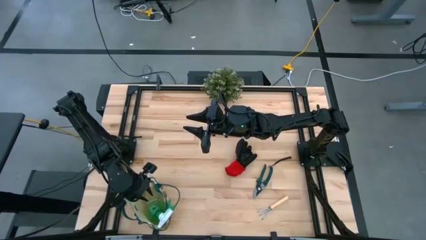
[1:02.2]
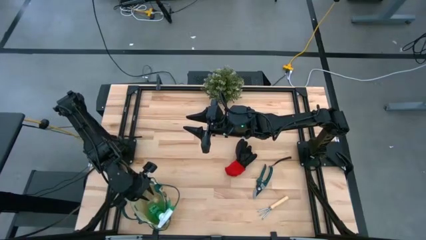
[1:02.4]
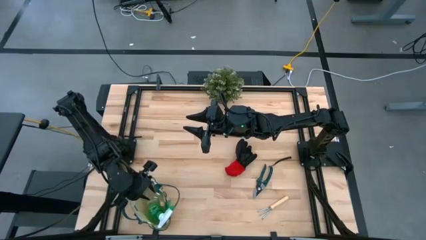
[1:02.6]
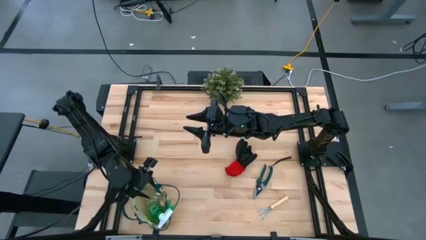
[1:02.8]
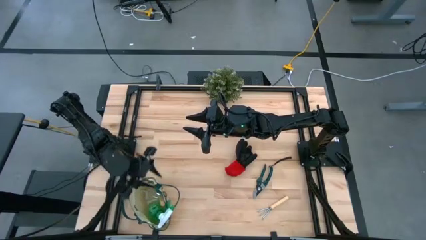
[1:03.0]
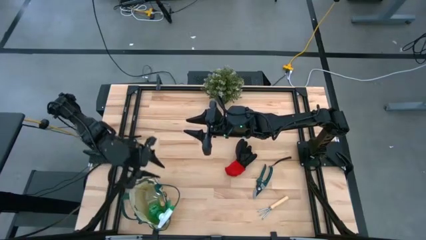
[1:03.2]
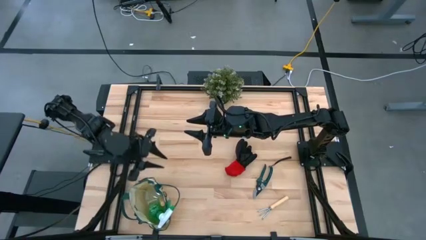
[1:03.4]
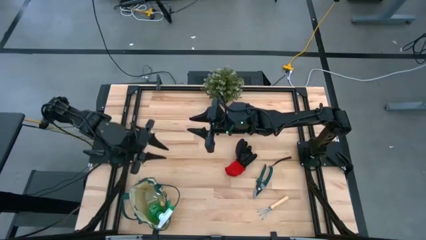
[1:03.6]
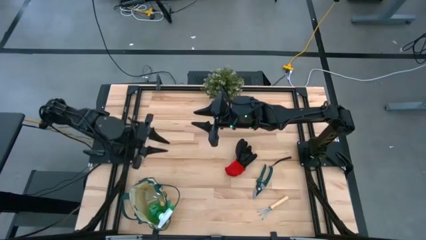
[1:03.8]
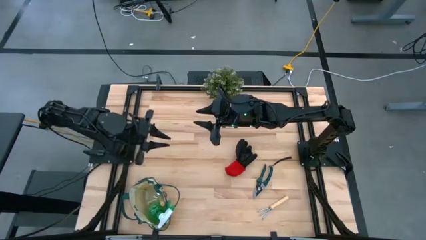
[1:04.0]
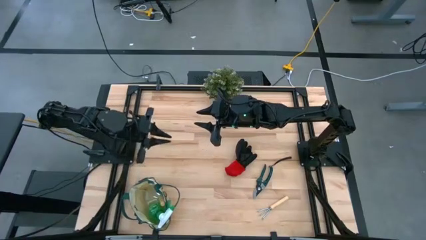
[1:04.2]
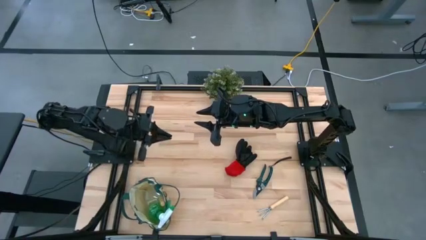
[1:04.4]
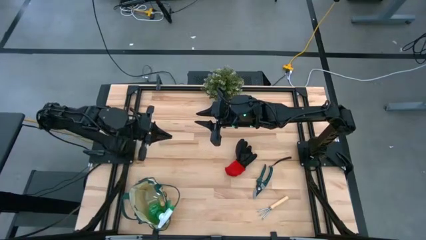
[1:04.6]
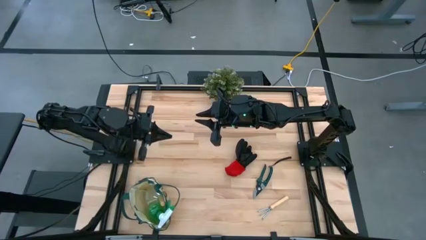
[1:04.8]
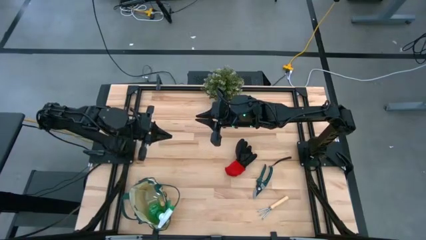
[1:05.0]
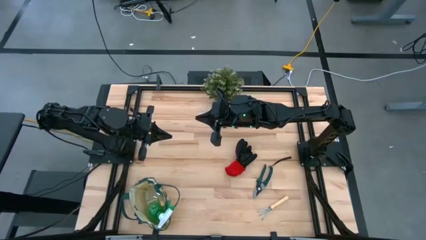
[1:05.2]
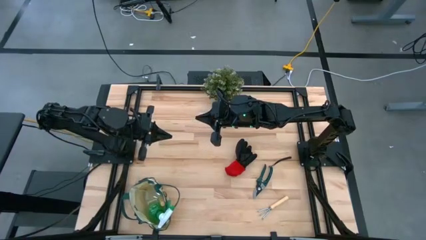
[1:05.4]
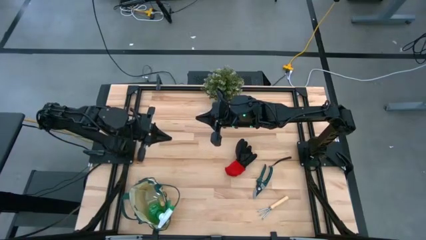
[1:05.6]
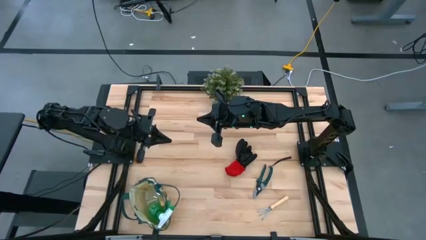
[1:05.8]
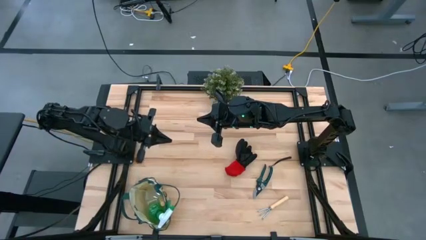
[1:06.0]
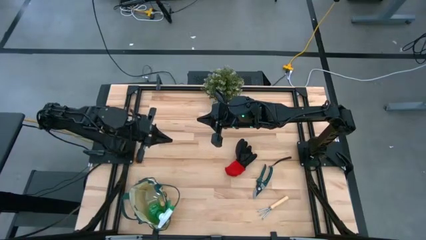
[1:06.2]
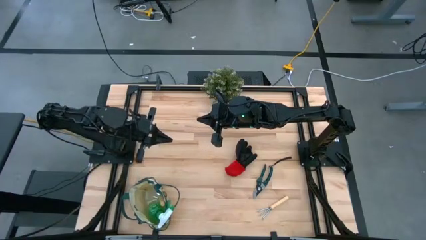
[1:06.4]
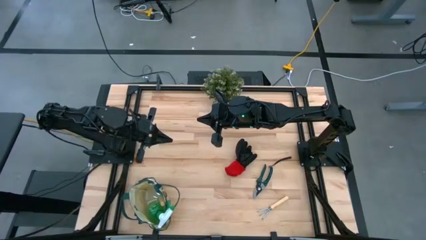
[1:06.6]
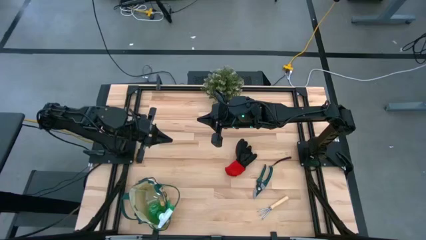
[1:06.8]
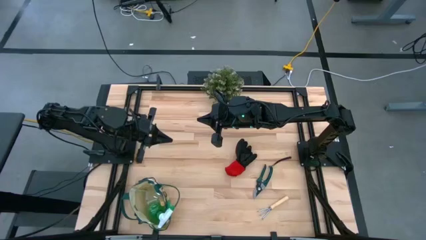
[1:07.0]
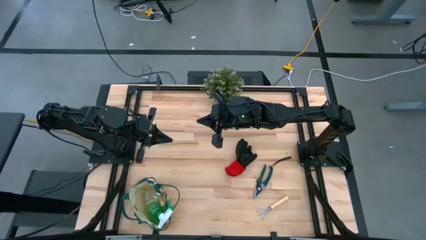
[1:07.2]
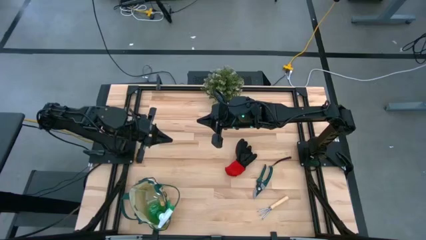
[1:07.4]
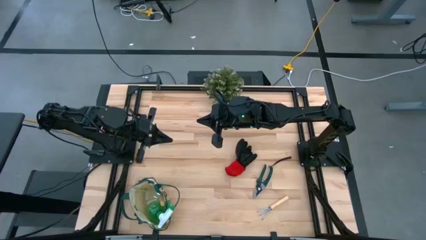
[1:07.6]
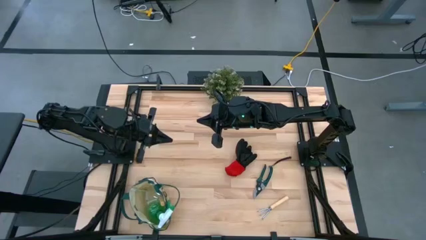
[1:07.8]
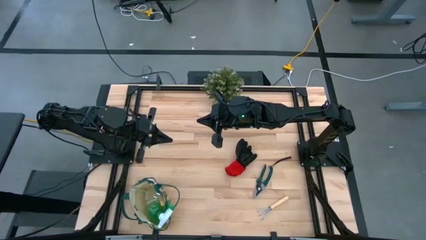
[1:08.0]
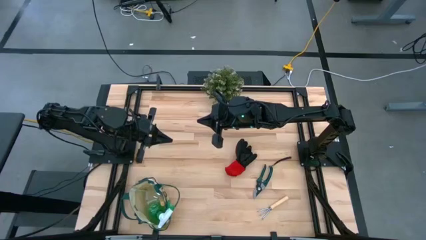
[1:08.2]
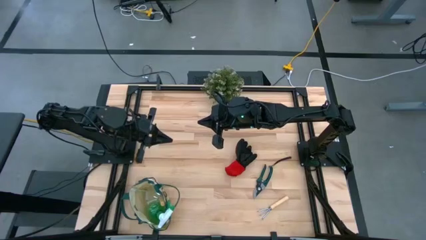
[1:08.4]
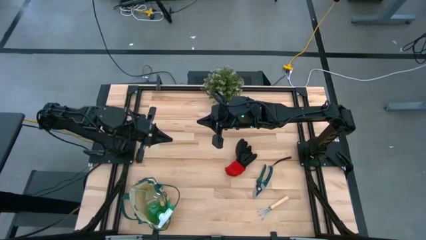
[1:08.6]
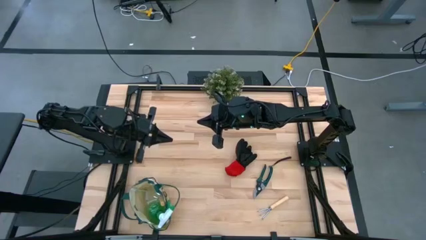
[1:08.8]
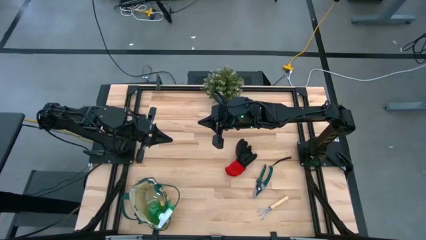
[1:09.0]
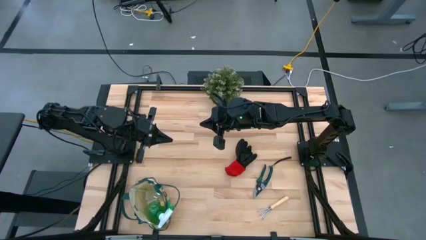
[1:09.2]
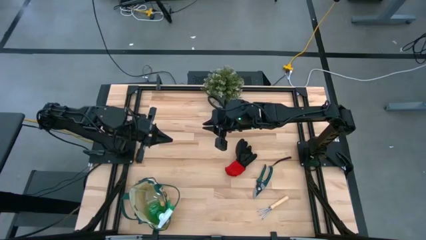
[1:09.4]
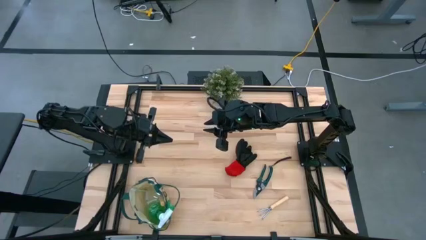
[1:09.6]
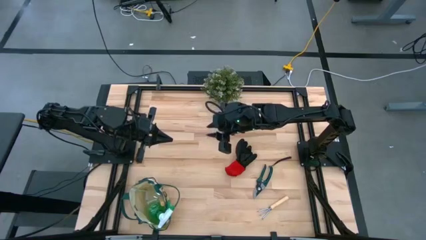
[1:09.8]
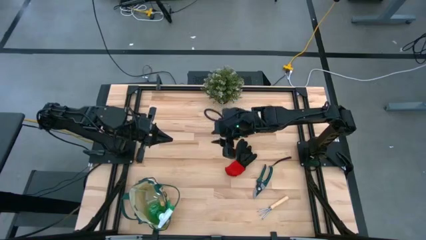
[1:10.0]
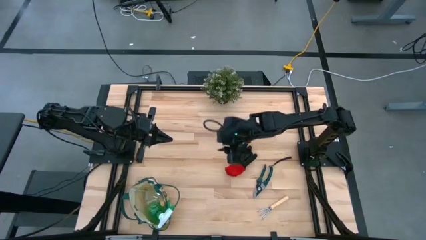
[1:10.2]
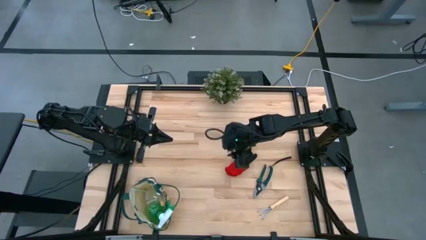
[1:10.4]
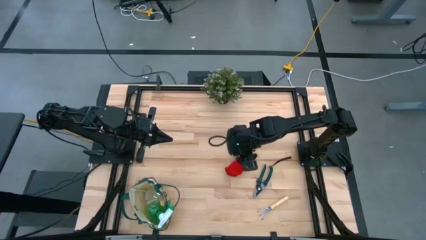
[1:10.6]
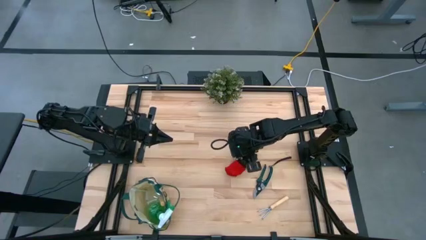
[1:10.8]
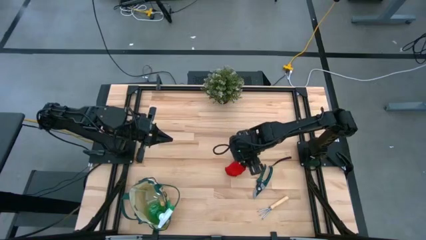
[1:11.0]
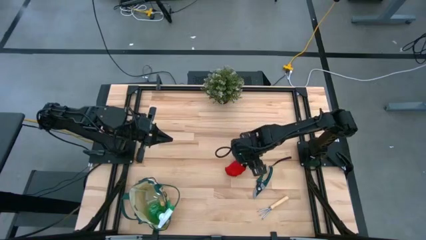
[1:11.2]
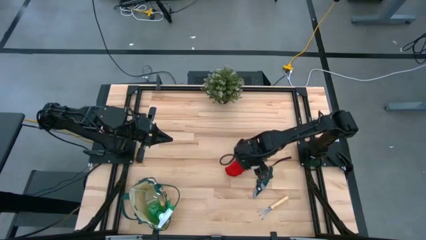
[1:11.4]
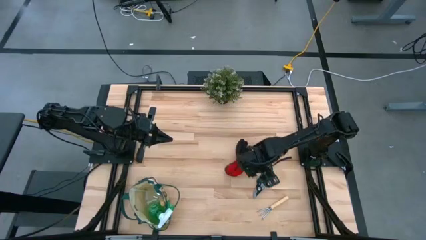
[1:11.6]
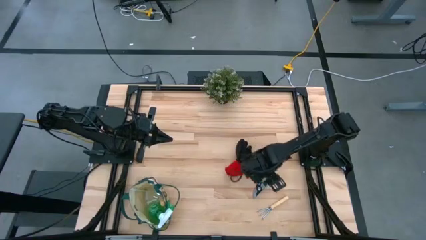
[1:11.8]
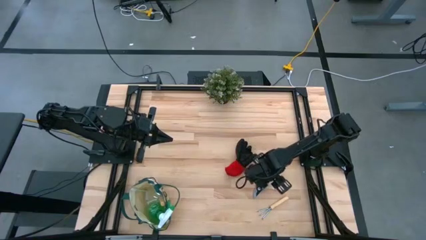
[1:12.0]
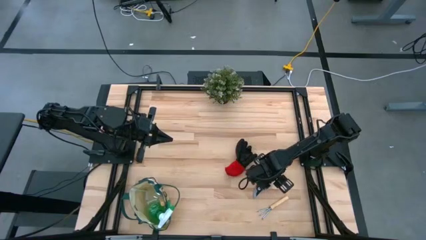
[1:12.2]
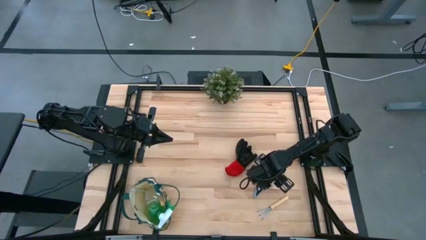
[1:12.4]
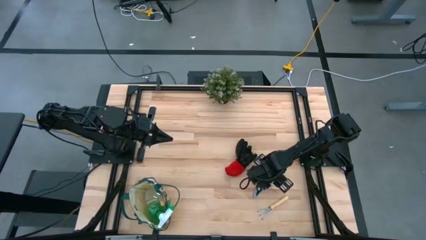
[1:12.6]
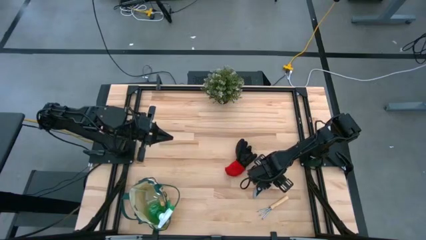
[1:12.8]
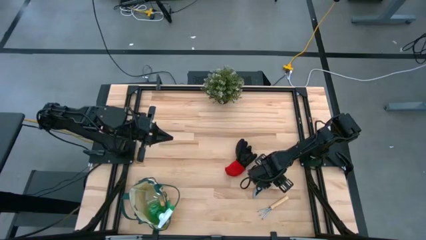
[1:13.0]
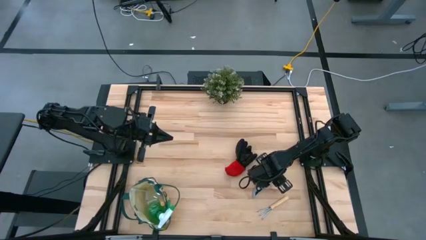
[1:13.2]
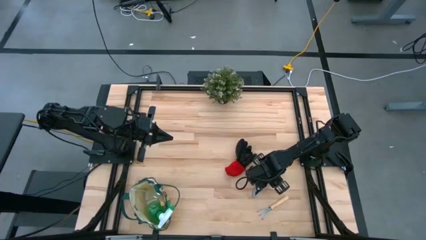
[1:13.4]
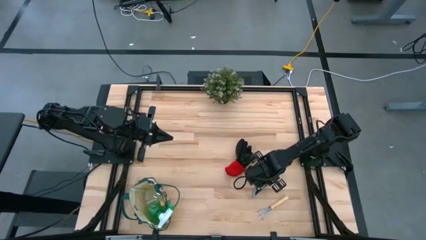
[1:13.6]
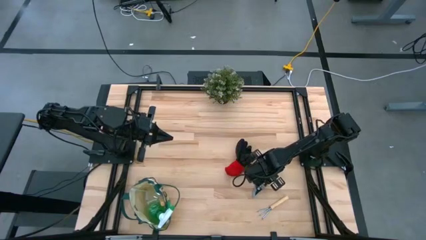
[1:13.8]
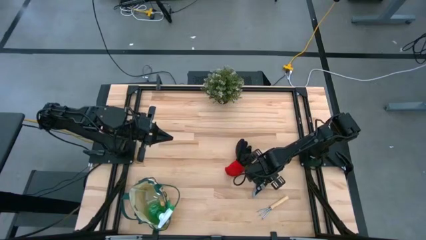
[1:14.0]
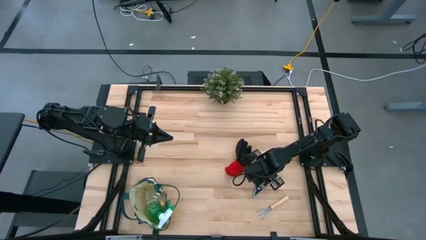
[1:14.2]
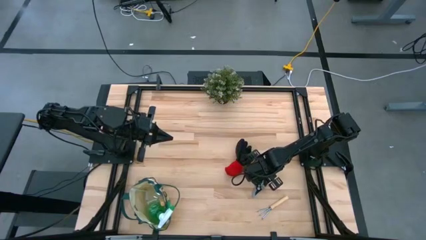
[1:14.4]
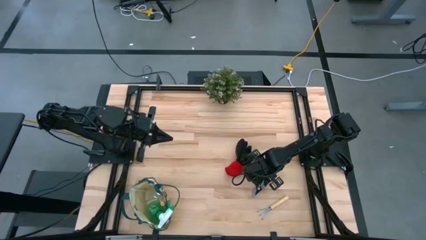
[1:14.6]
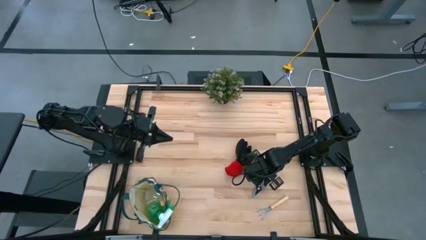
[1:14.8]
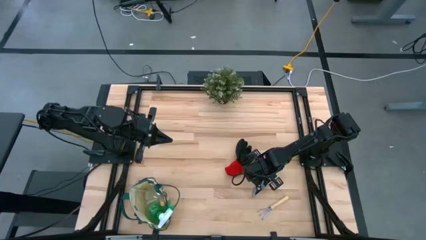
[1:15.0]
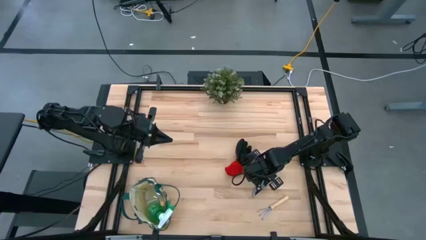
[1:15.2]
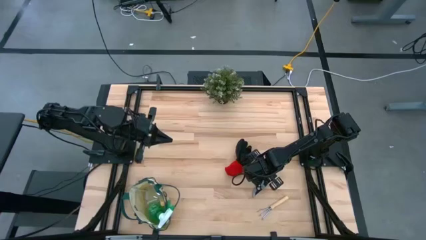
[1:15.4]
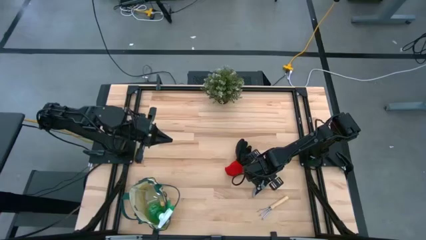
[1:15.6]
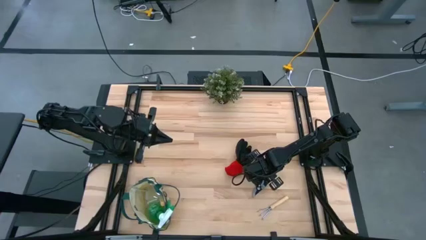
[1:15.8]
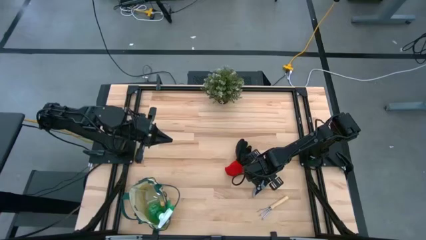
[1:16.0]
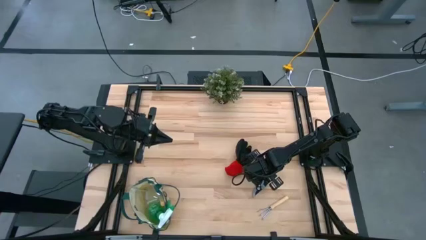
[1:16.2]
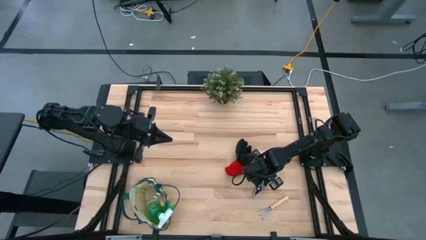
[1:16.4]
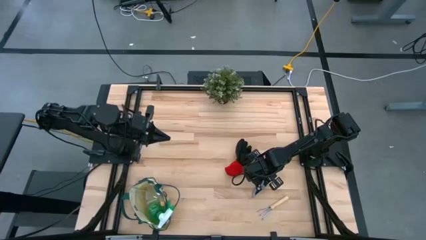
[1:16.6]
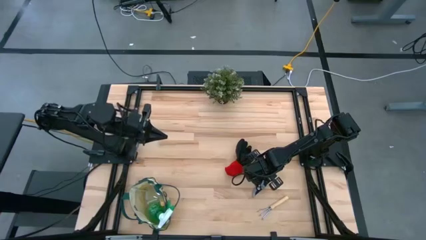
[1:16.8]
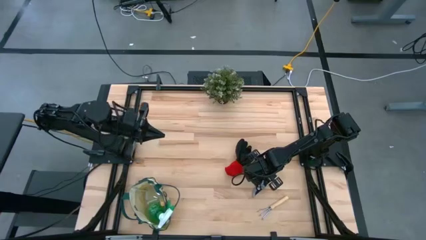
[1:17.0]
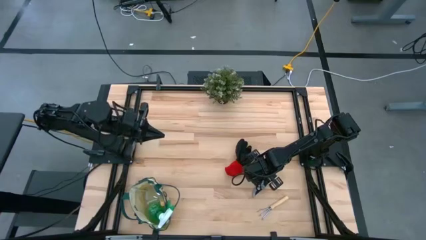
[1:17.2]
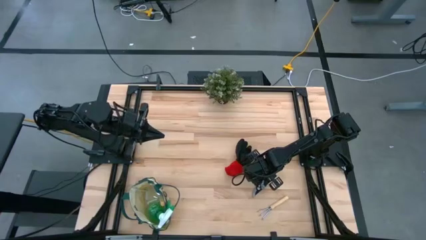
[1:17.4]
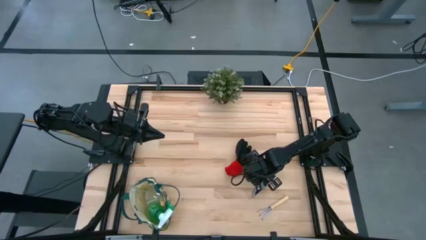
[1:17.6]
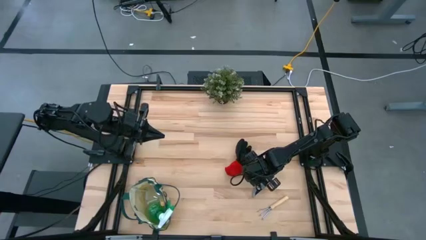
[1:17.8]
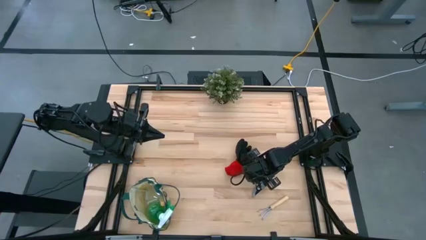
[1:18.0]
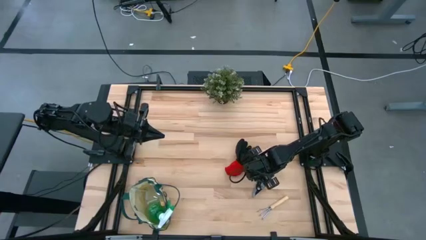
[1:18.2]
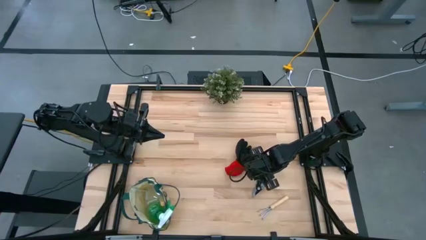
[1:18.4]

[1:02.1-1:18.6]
Task: Pick & Place Garden tools in Gardening bag
Put the green shear scissors into the gardening bag
